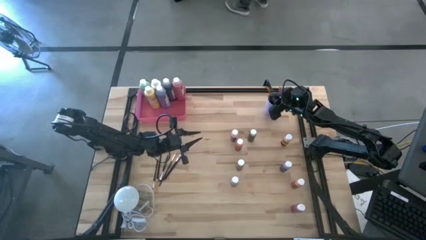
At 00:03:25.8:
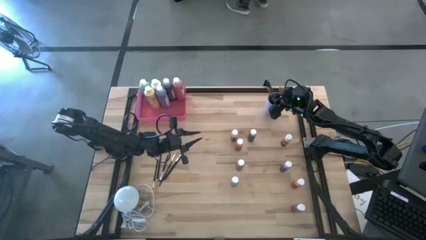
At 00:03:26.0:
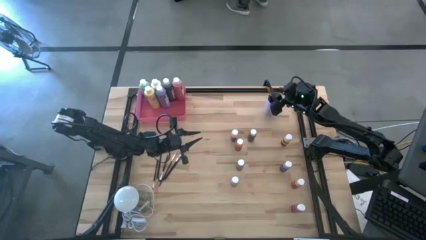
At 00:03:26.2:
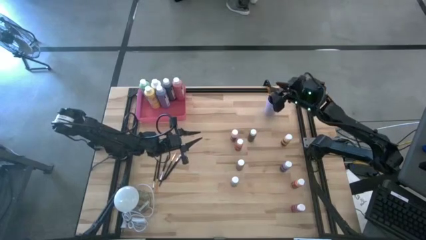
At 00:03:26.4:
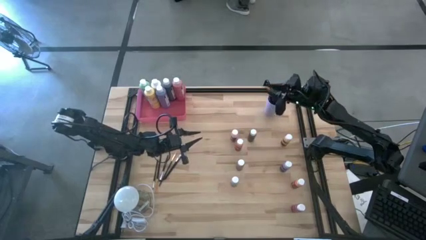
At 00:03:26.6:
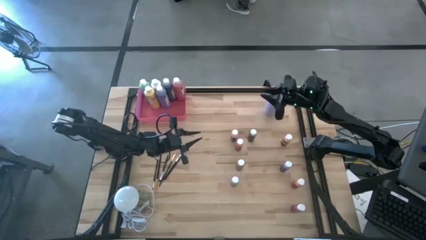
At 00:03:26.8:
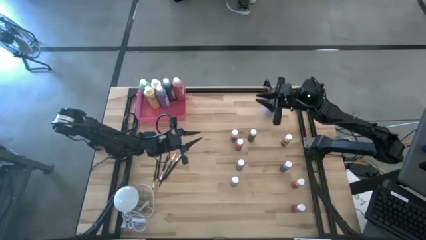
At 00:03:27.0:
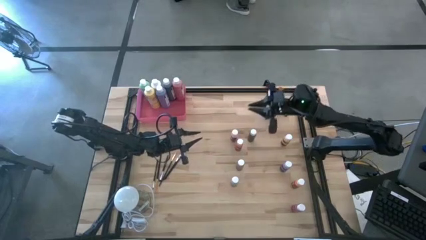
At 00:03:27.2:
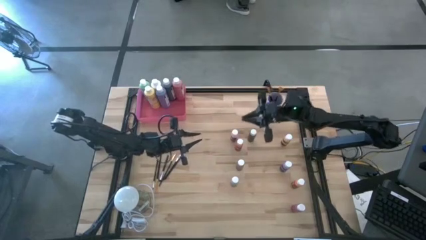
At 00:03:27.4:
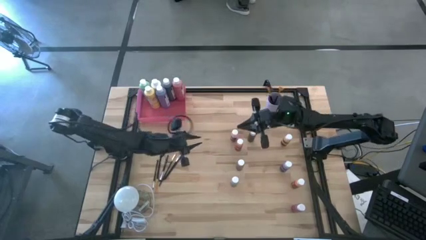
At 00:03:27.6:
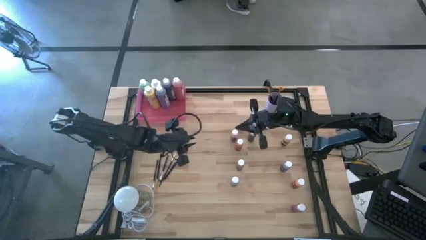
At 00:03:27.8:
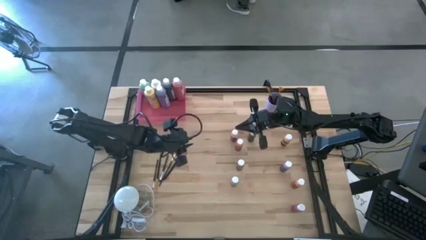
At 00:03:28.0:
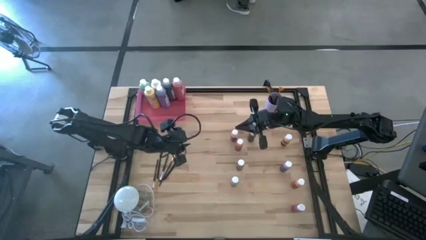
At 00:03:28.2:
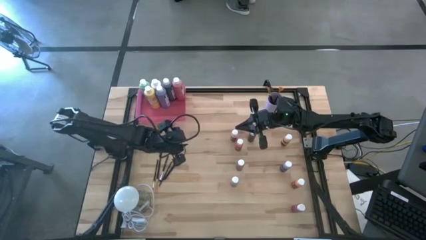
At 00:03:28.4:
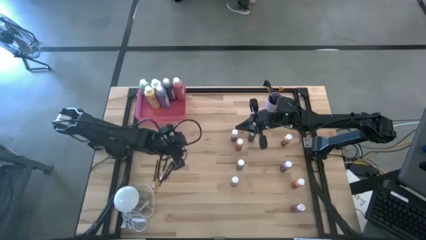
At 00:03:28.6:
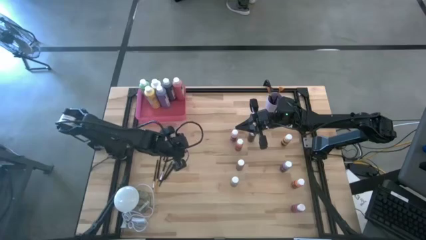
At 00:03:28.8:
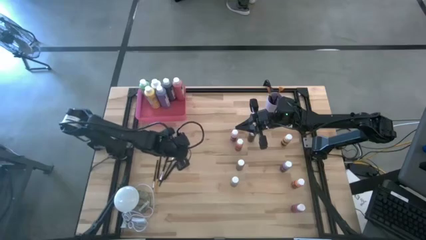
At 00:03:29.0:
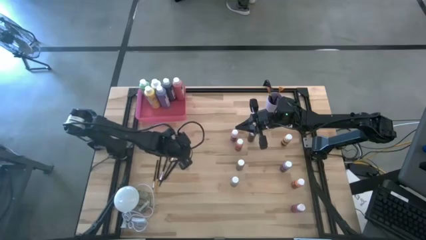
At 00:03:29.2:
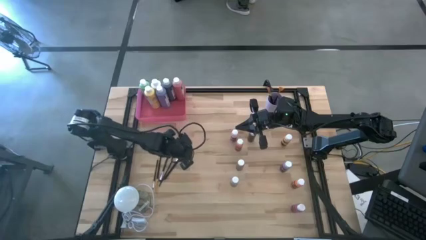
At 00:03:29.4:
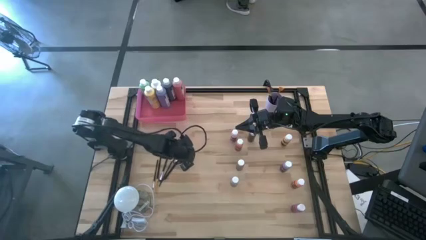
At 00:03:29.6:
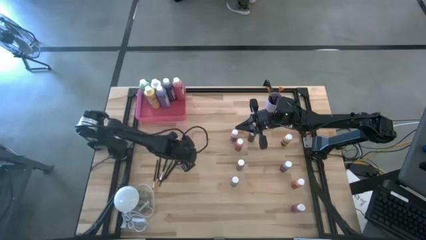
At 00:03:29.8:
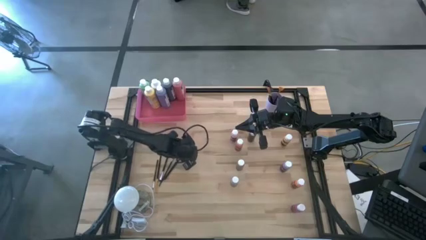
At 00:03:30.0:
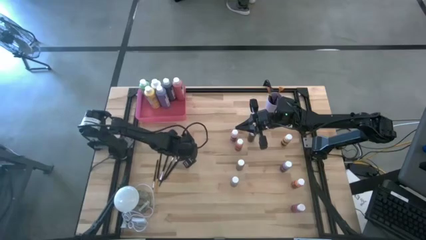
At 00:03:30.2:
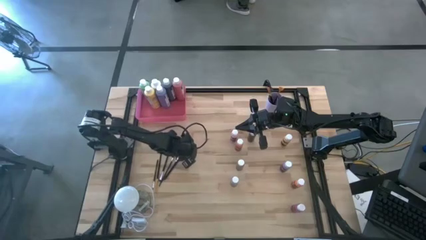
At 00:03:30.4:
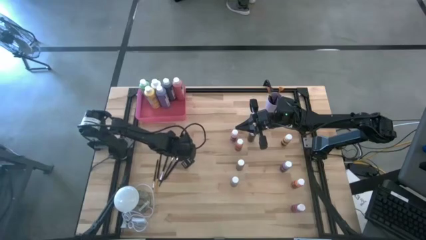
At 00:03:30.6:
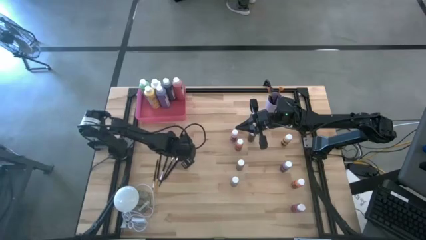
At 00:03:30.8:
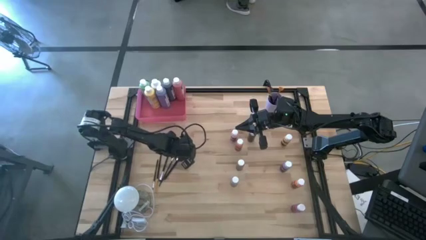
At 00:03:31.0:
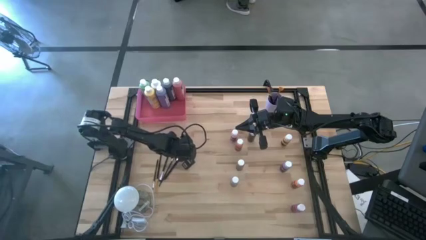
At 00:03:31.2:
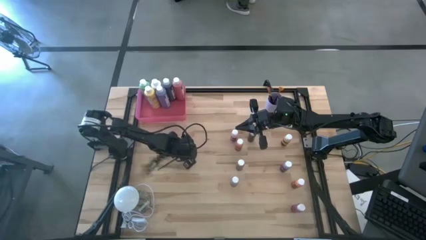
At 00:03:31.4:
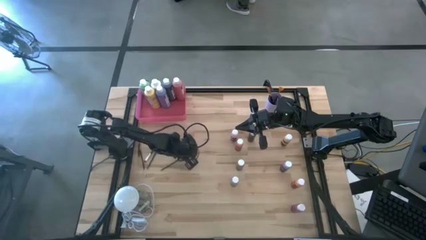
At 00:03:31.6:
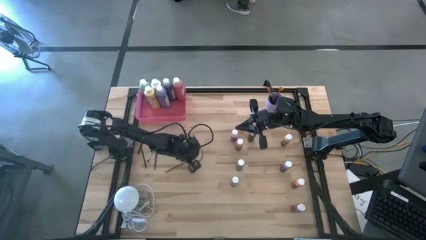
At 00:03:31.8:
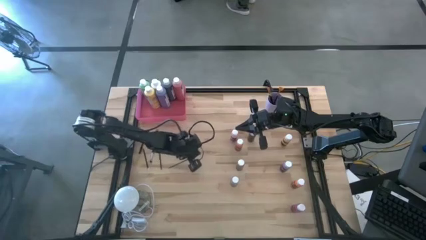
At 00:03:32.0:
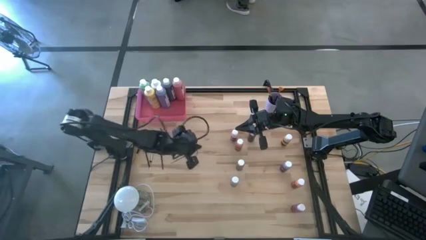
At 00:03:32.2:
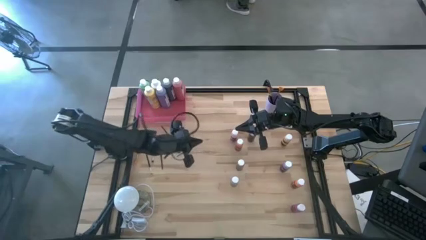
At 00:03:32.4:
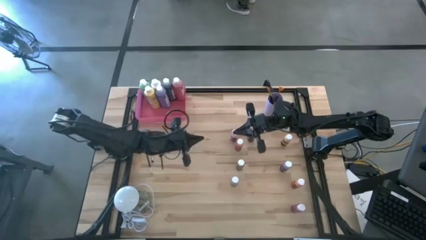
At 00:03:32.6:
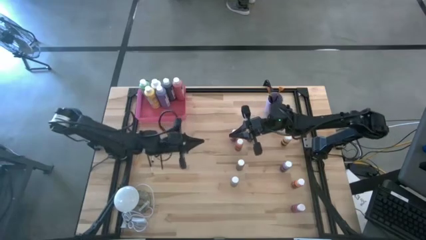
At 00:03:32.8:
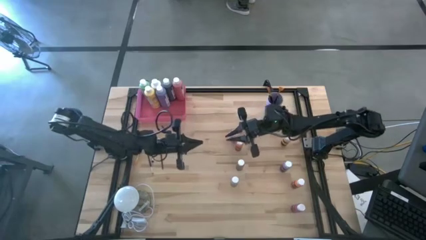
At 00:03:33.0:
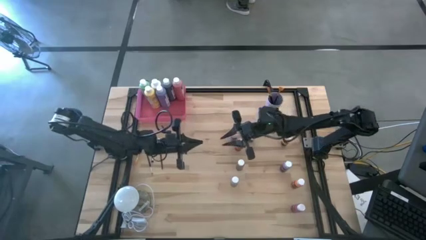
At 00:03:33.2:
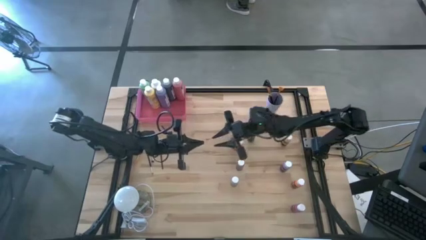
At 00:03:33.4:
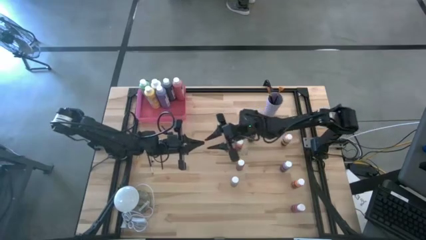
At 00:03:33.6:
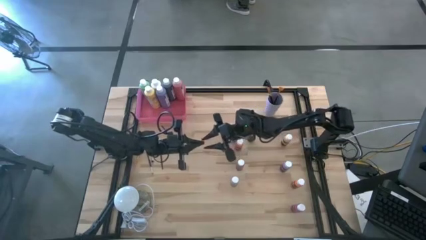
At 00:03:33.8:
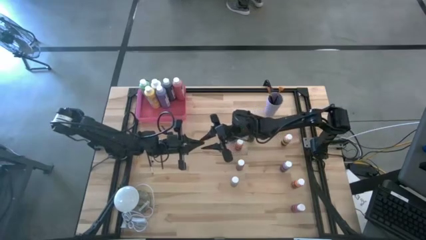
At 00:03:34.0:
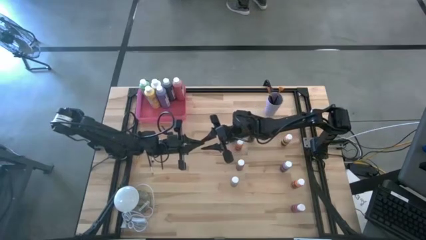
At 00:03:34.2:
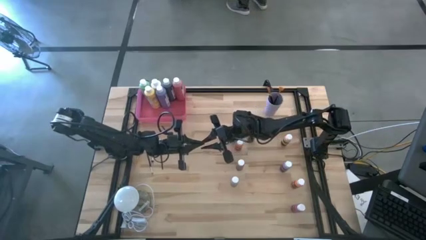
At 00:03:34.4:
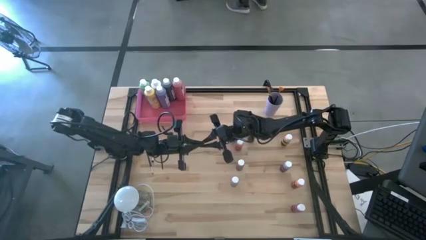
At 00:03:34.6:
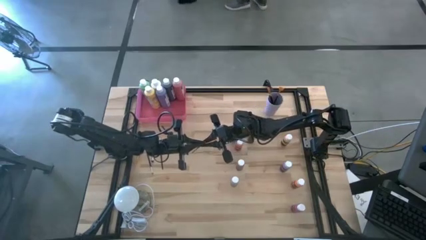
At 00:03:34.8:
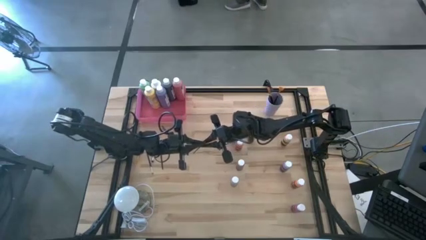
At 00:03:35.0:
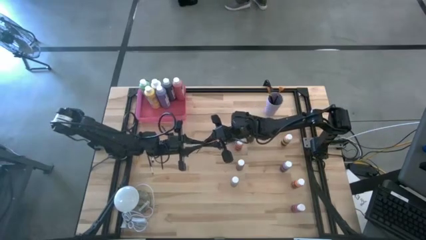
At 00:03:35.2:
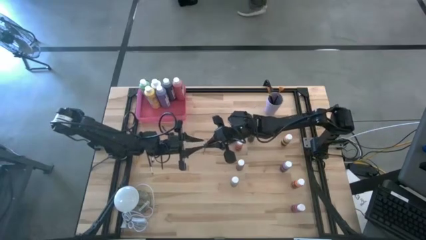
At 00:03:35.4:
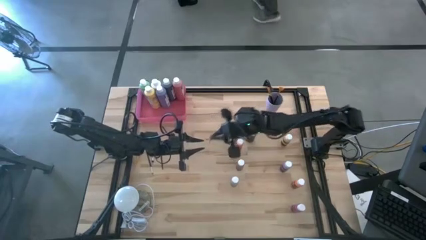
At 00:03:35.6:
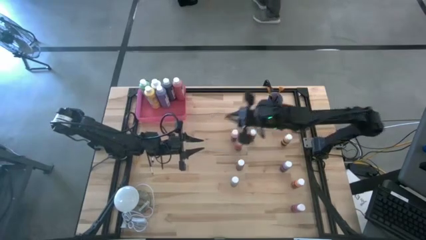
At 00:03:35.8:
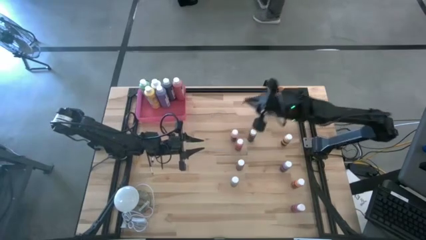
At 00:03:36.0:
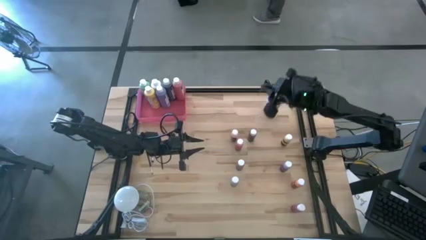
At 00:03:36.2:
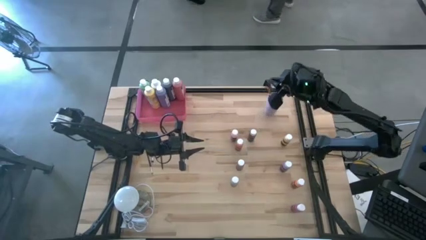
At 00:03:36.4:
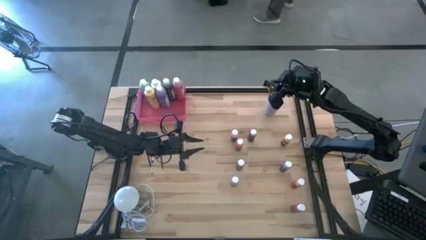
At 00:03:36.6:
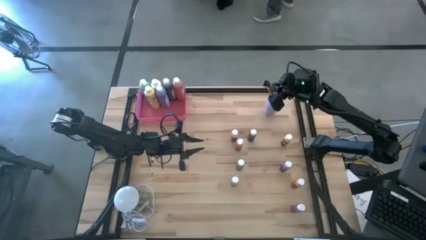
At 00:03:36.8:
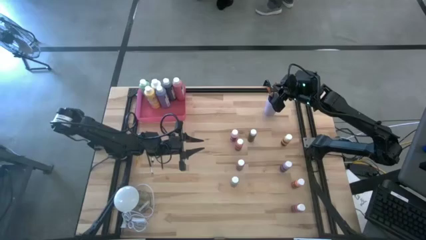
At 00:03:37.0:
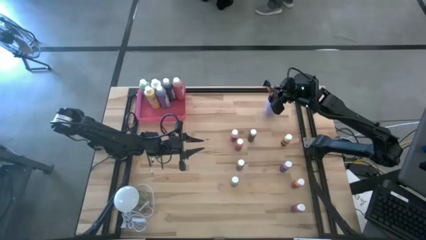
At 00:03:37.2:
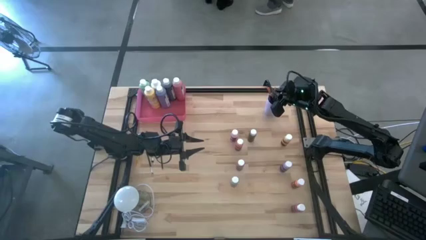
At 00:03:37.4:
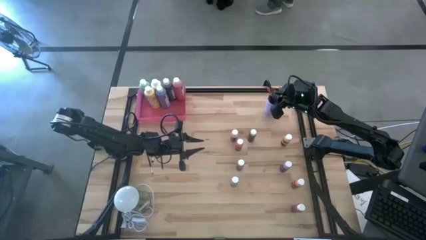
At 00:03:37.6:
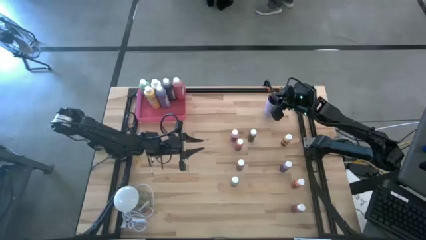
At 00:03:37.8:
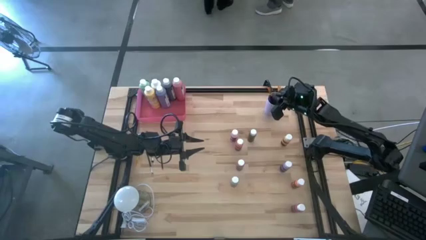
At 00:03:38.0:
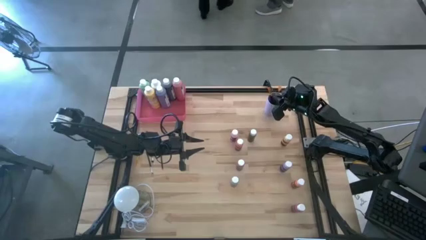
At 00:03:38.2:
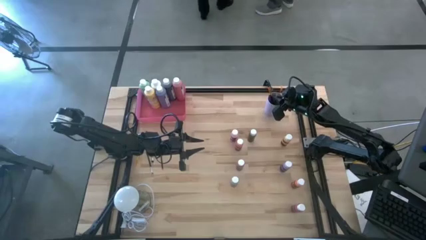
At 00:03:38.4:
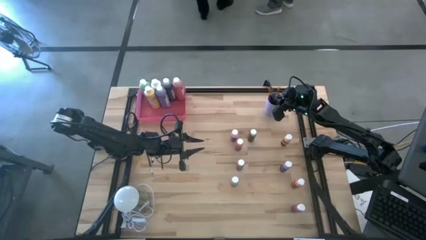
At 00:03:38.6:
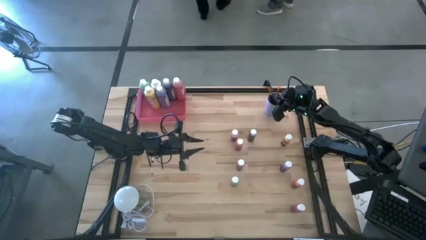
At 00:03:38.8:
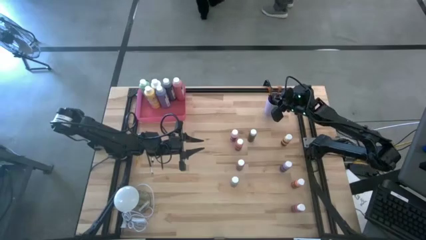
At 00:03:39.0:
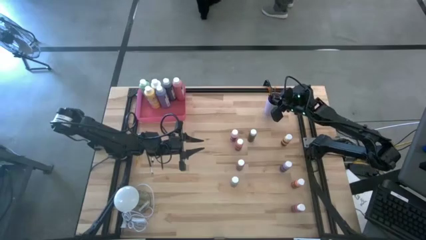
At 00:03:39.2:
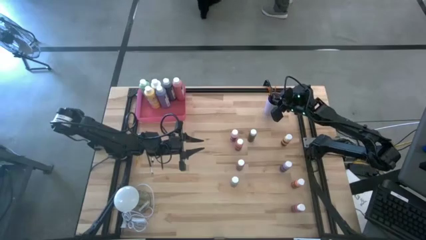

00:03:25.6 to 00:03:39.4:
Task: Pick & Place Paint Supplies
Put the gold paint brush into the purple cup

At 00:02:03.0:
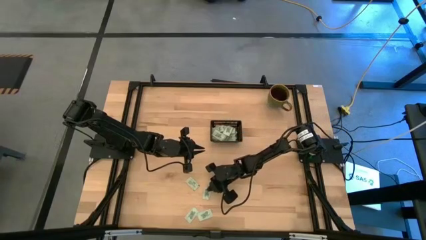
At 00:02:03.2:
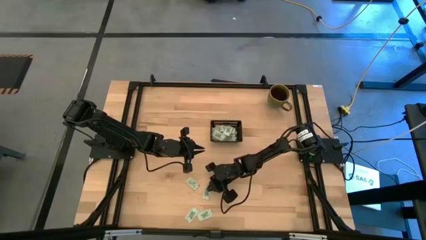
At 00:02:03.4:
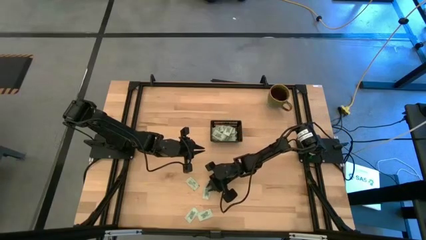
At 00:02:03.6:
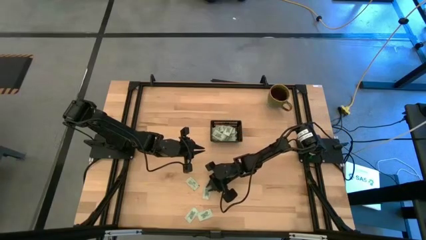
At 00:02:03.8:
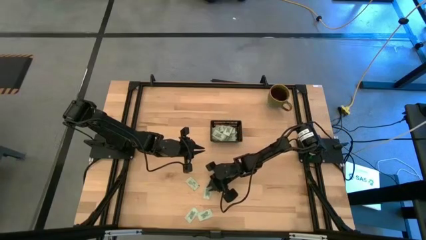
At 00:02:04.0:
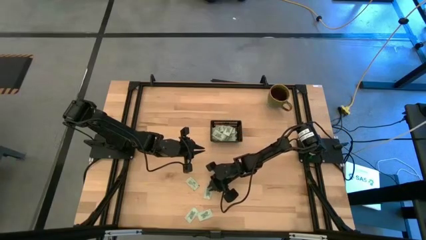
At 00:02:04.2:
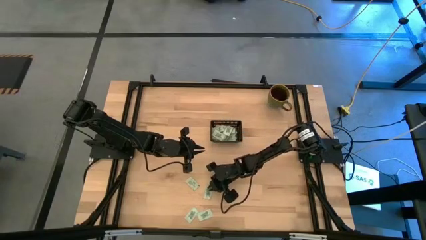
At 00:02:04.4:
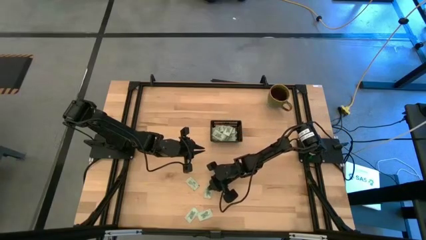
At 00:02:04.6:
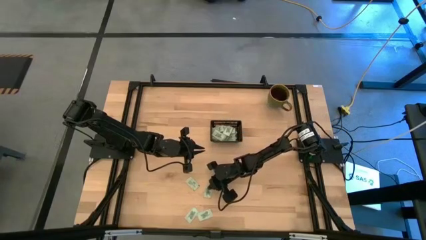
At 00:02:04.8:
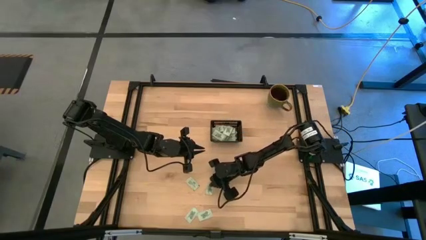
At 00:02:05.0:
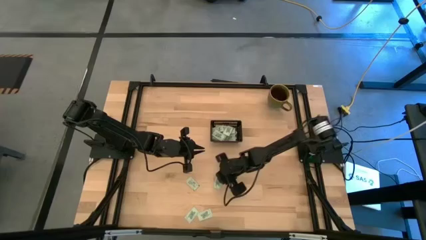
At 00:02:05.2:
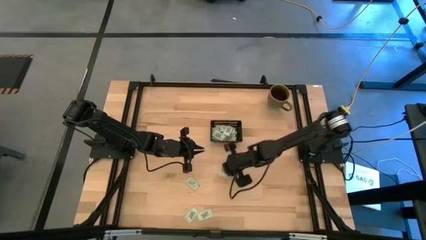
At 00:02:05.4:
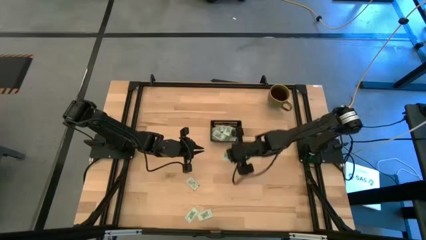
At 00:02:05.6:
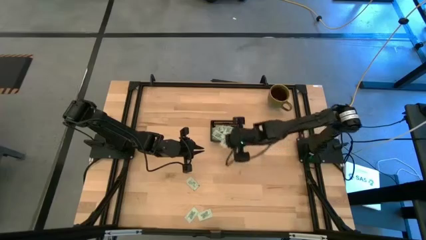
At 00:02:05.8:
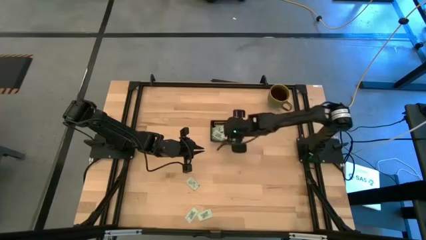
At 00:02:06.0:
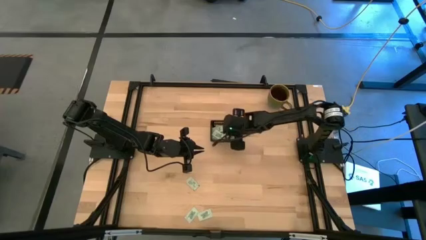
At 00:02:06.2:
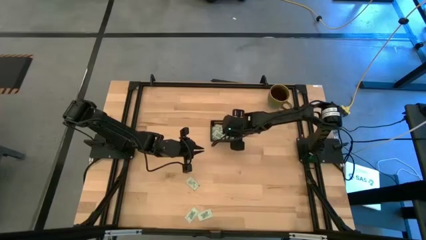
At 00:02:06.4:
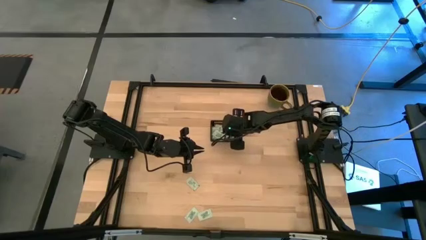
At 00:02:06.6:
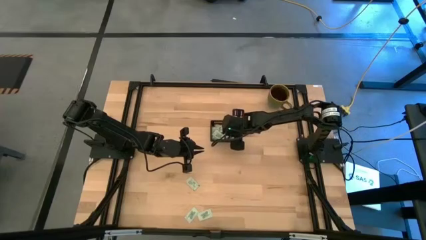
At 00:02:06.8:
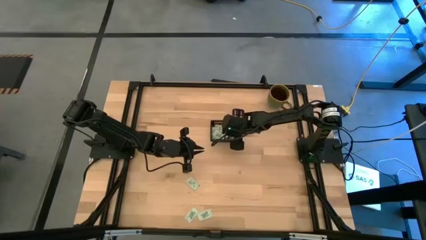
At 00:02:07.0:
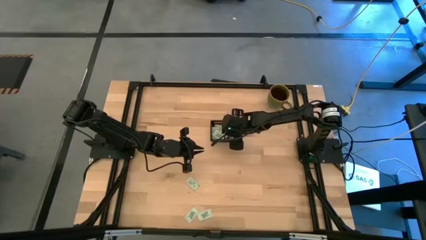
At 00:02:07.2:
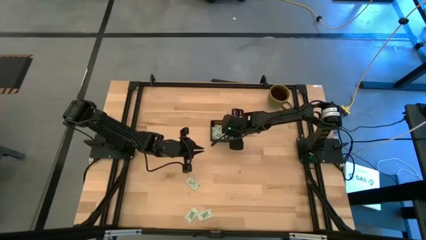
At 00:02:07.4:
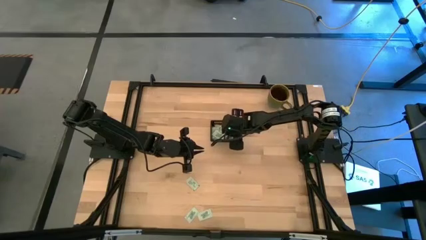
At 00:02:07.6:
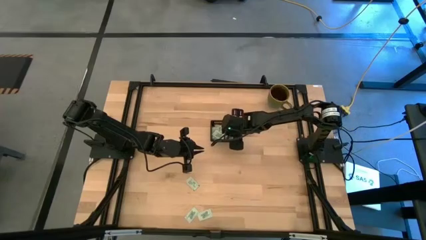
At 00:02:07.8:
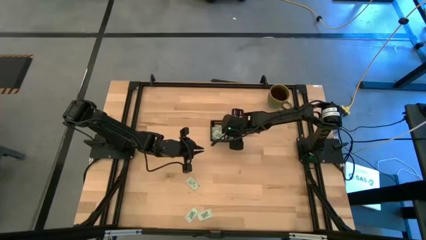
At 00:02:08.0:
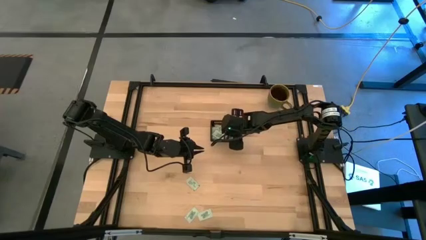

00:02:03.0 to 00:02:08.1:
Task: Pick and place Stevia / Truvia into bins
Put the stevia packet into the black basket
